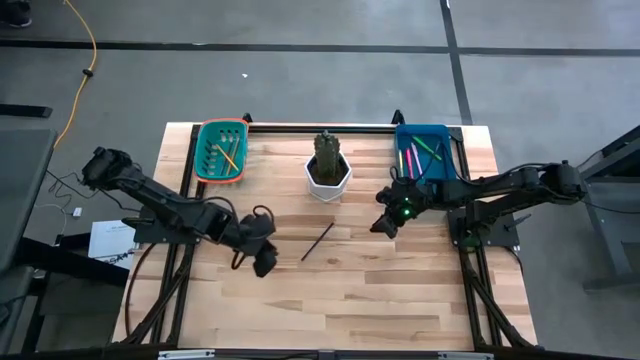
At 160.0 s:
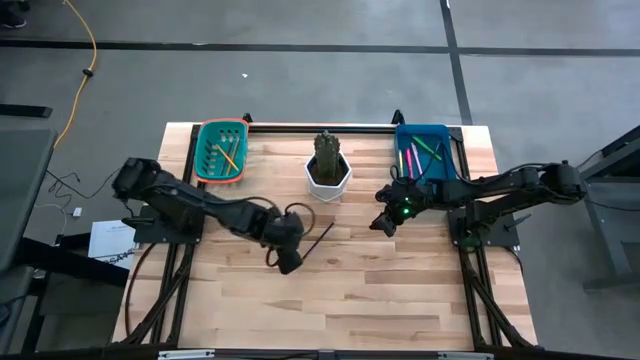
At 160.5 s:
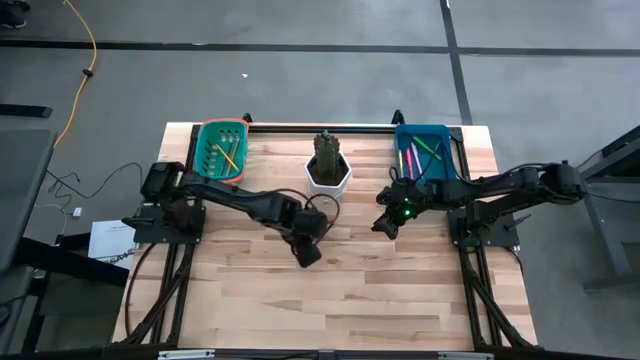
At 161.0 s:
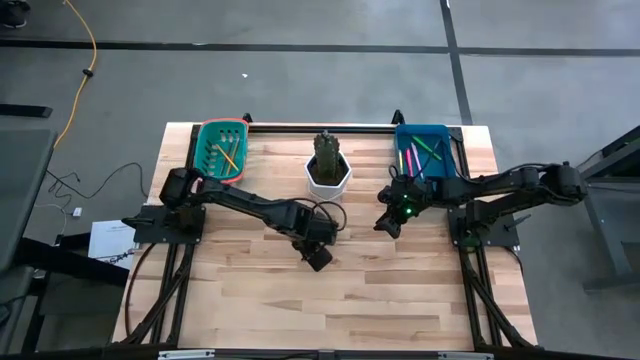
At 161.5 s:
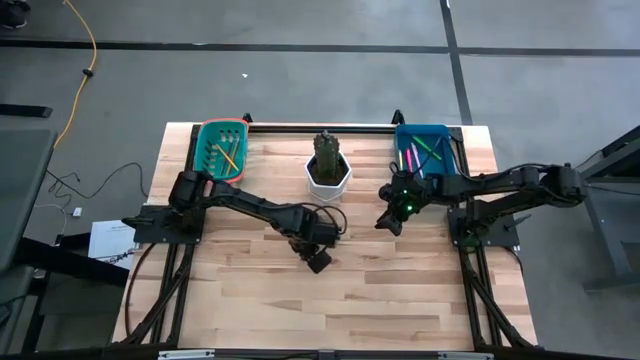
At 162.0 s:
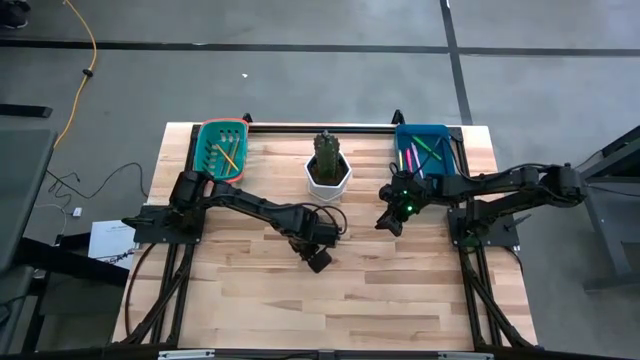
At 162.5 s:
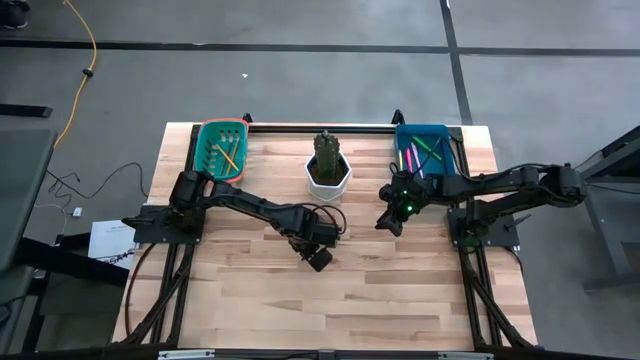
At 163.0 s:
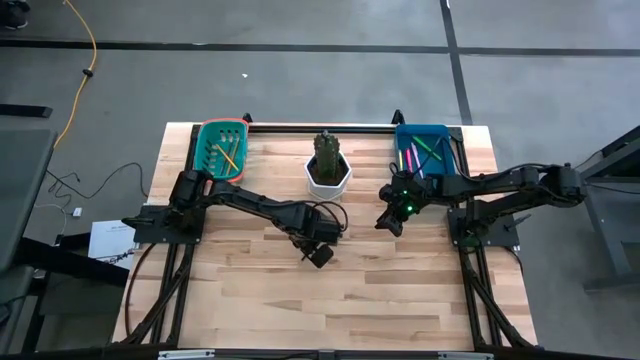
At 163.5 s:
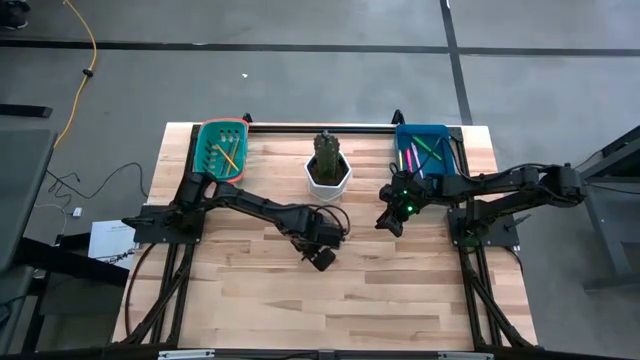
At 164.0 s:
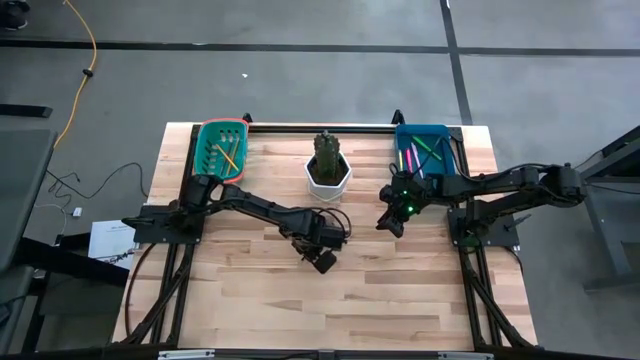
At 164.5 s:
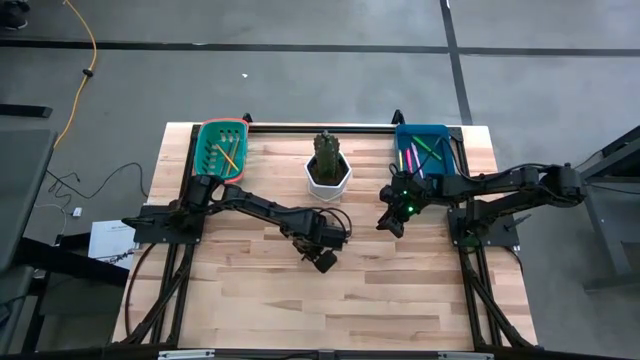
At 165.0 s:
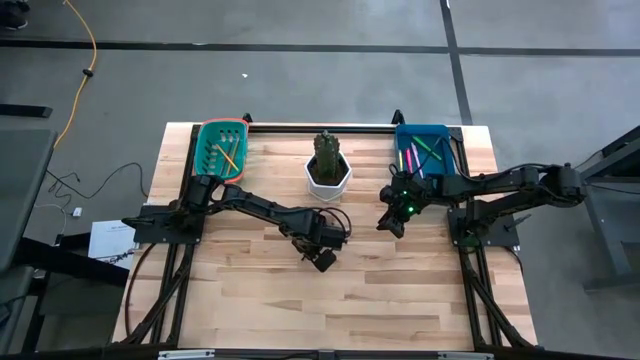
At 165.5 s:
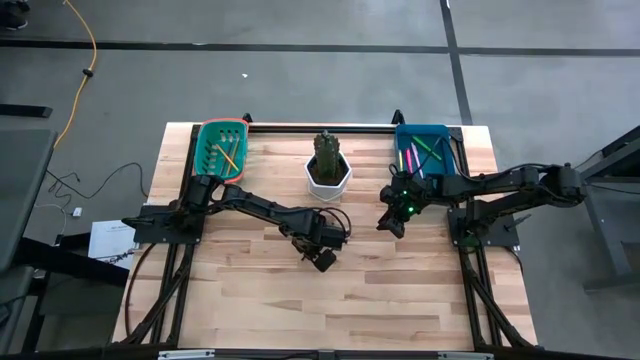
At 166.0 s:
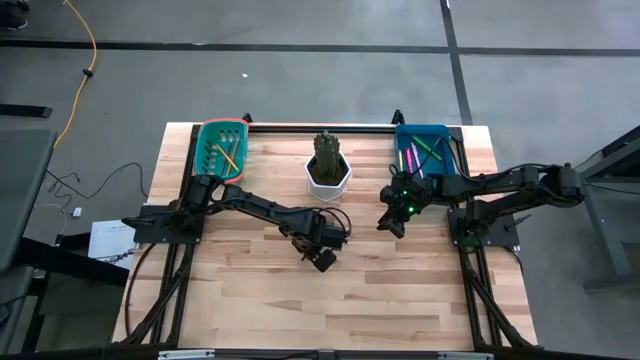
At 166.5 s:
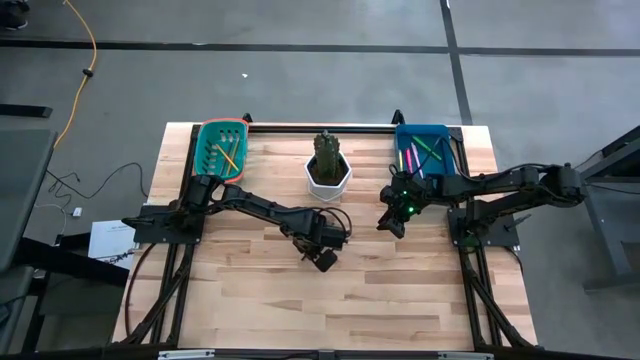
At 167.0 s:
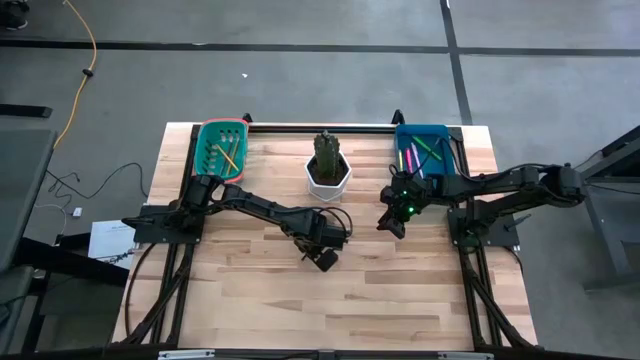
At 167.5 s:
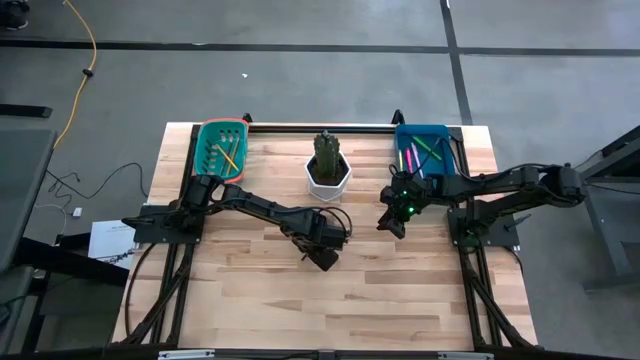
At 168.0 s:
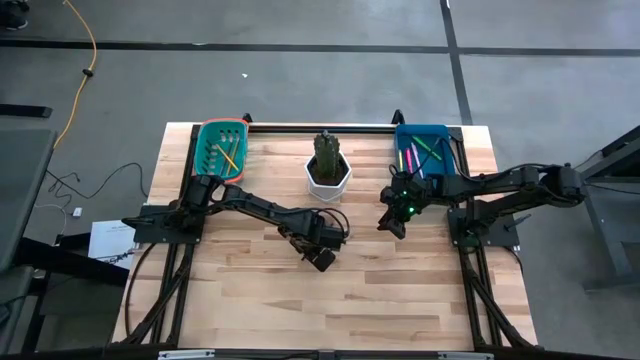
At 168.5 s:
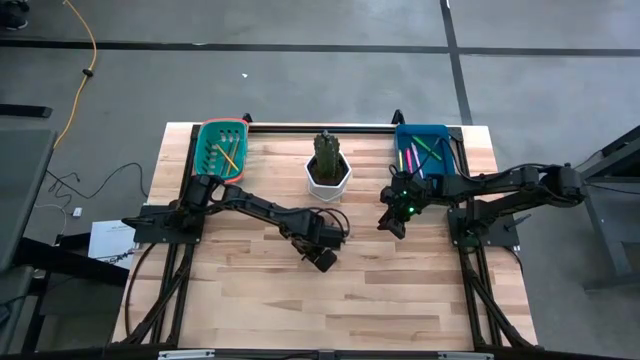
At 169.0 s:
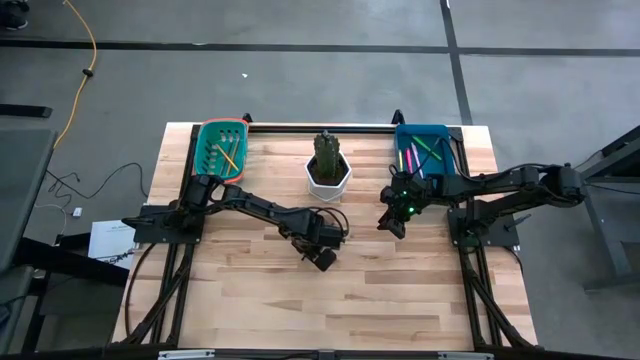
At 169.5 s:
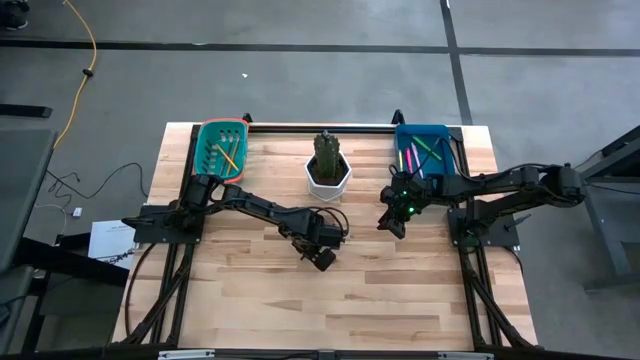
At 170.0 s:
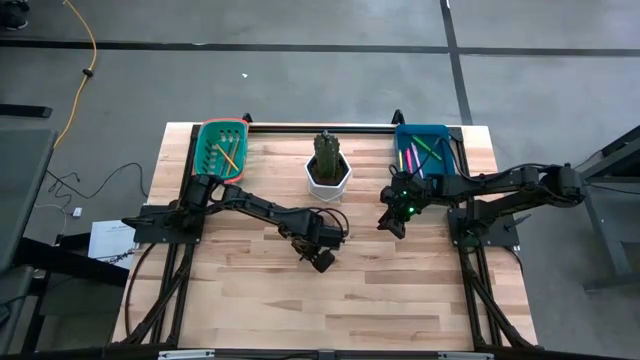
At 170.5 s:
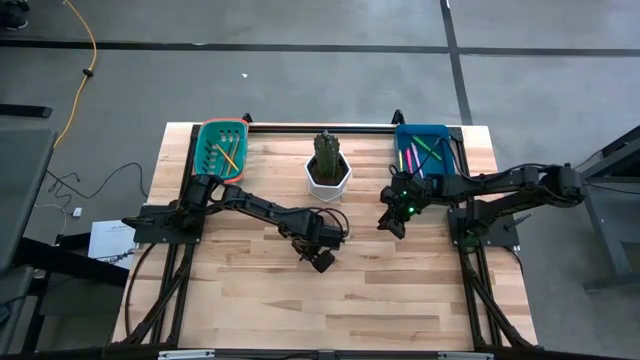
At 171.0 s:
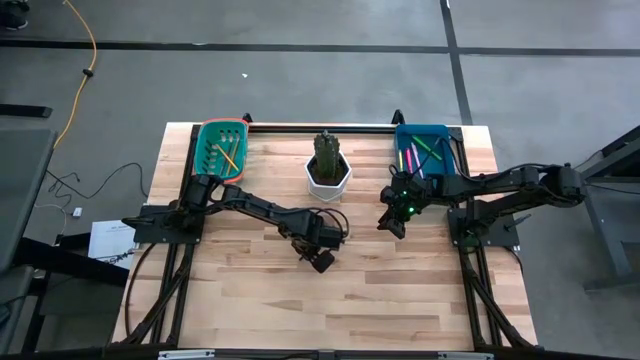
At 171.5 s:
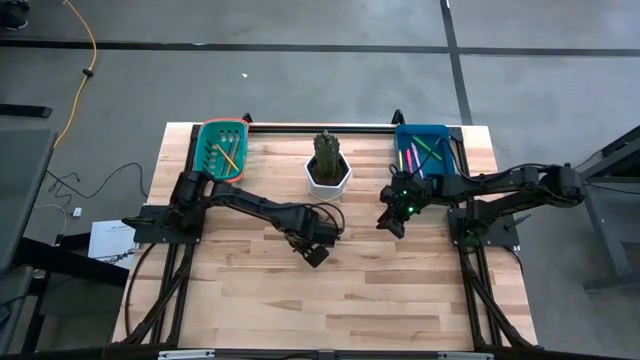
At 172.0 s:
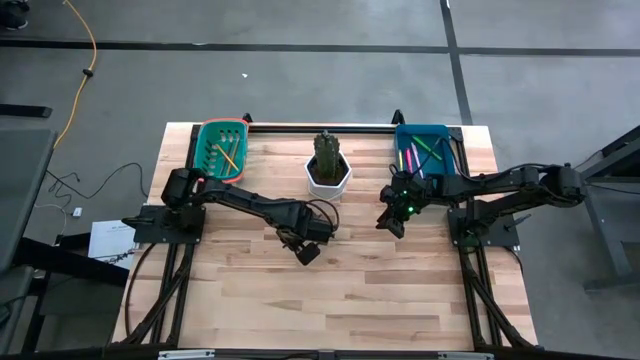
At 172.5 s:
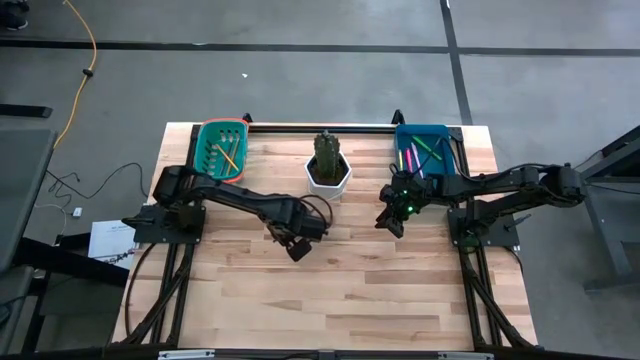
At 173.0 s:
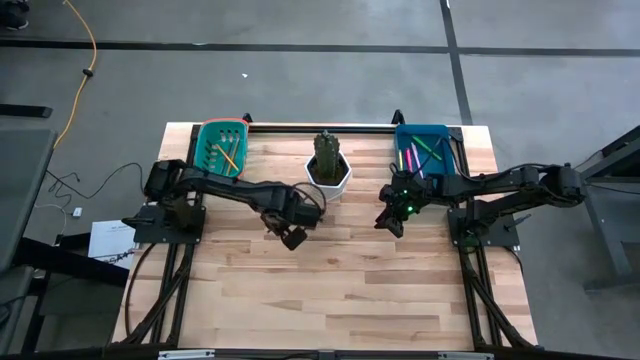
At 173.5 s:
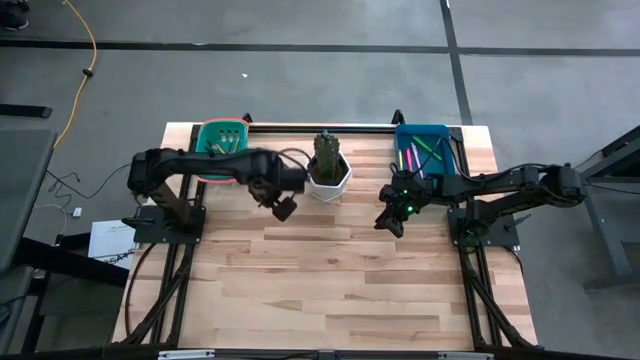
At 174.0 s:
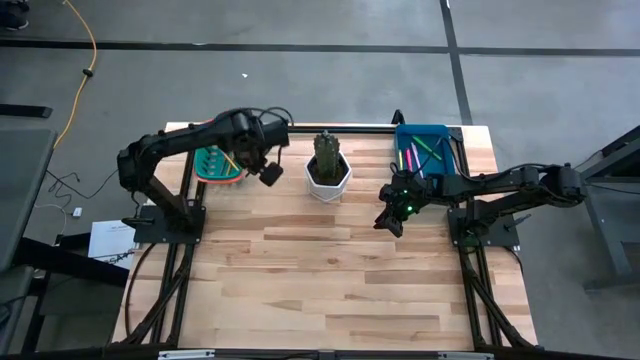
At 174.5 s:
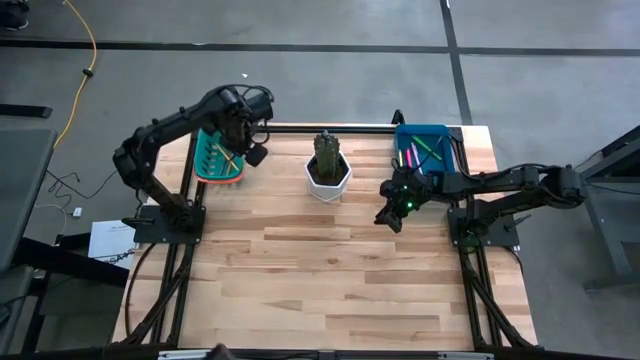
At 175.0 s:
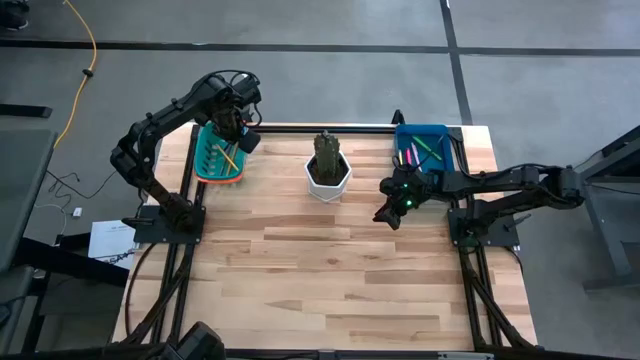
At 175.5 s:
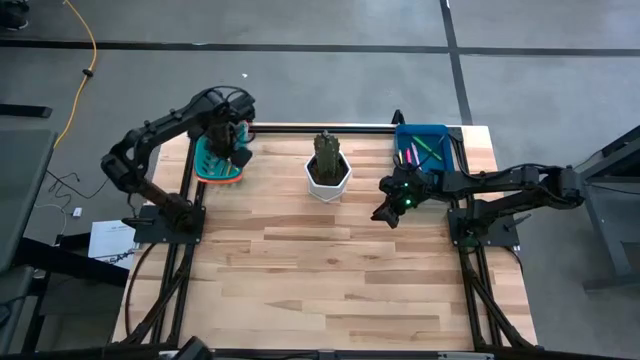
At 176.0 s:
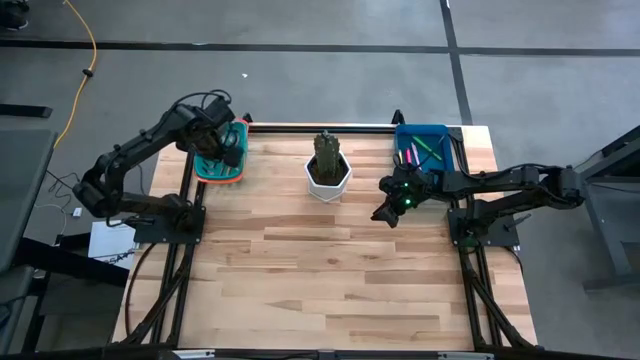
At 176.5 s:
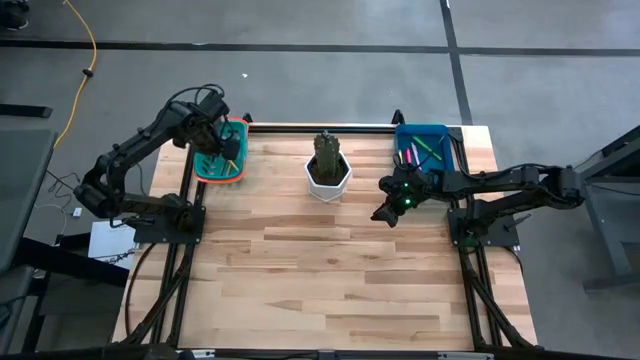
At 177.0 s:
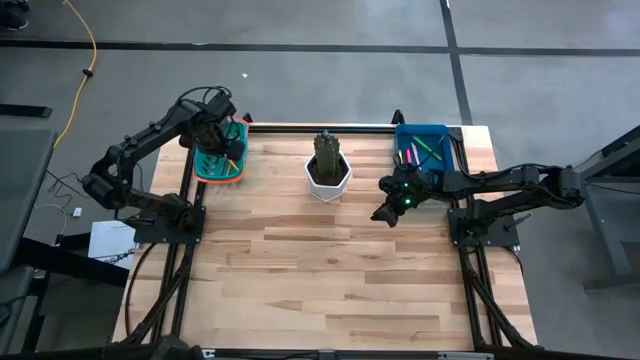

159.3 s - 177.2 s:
Task: Sort pens & pencils
Put the dark blue pencil into the green bin
